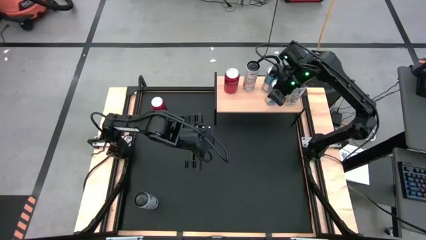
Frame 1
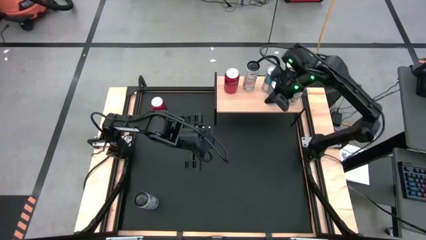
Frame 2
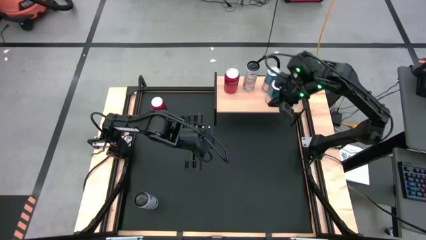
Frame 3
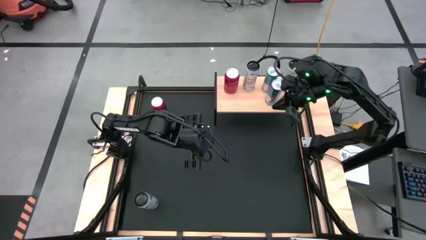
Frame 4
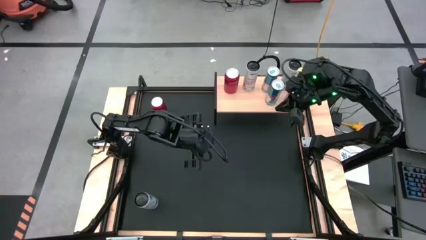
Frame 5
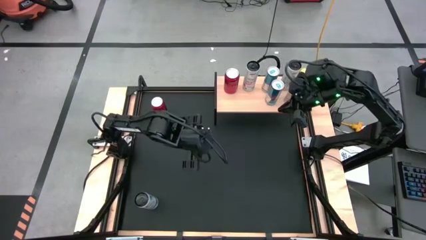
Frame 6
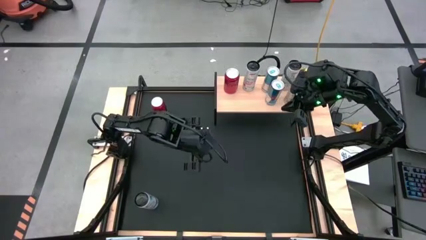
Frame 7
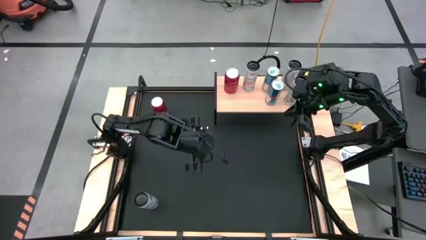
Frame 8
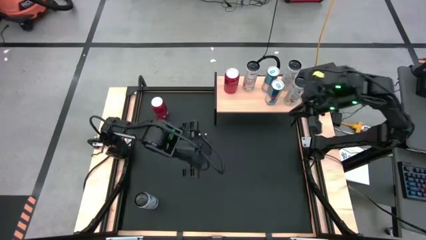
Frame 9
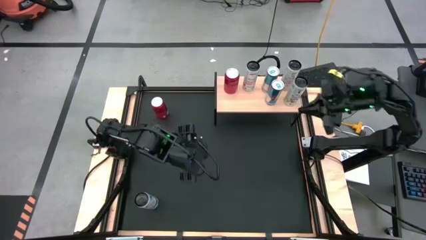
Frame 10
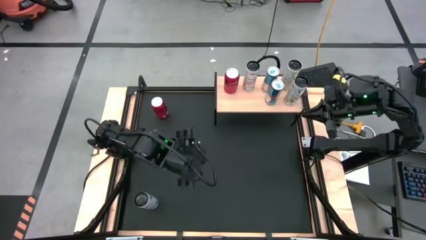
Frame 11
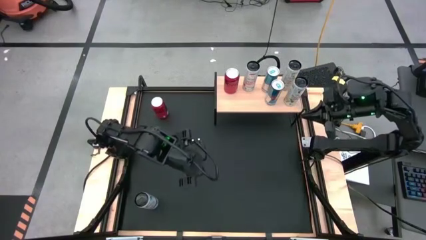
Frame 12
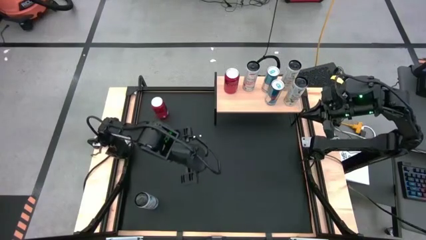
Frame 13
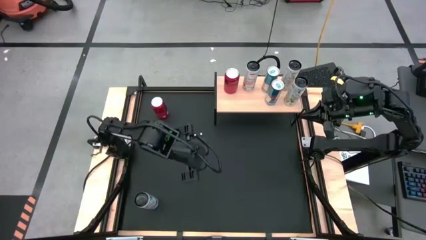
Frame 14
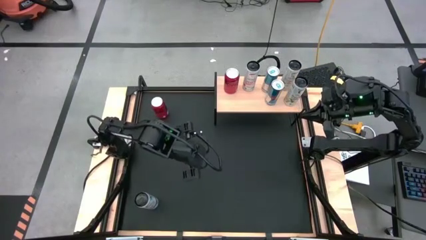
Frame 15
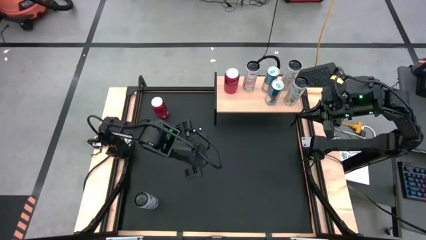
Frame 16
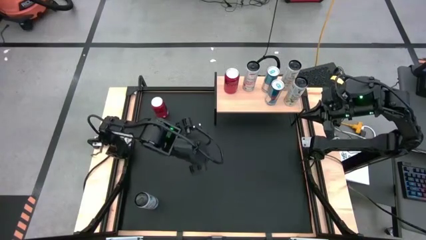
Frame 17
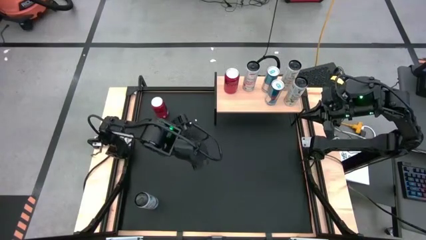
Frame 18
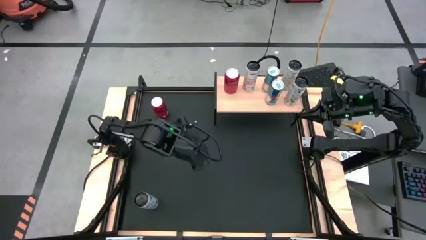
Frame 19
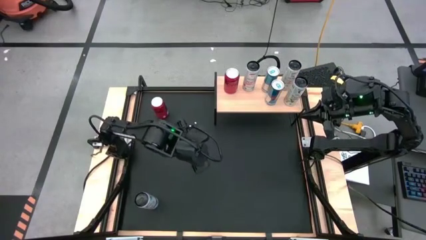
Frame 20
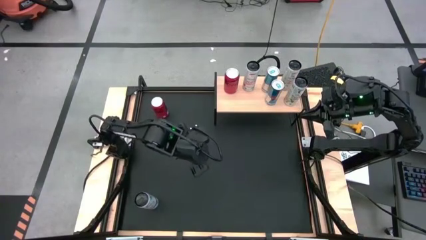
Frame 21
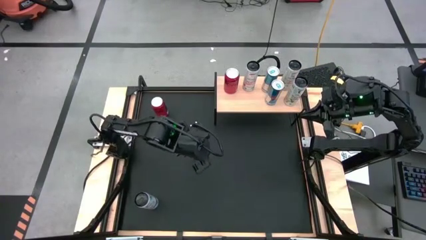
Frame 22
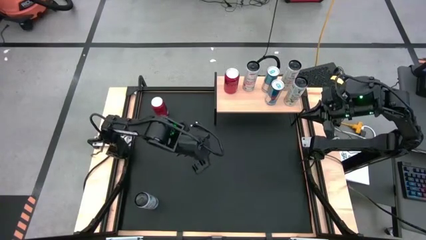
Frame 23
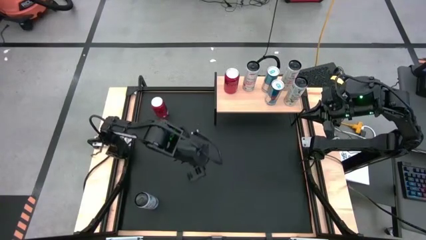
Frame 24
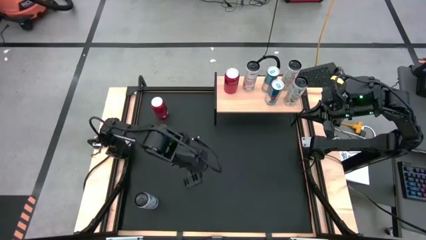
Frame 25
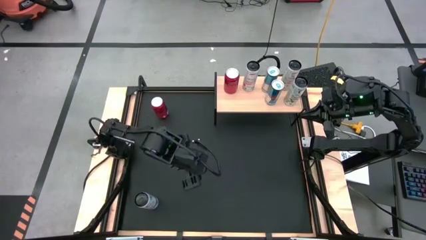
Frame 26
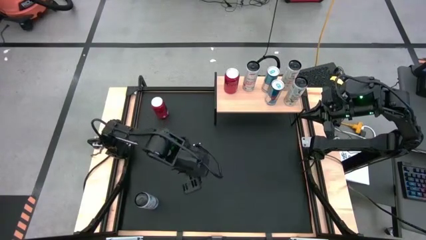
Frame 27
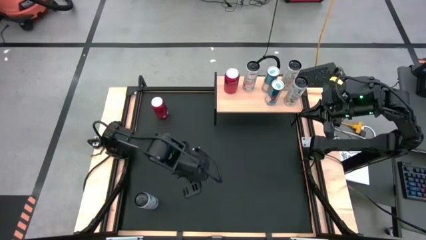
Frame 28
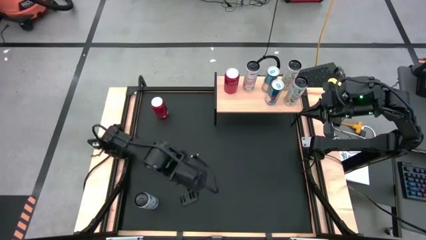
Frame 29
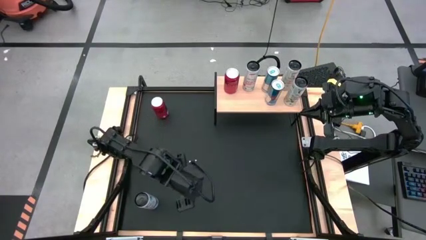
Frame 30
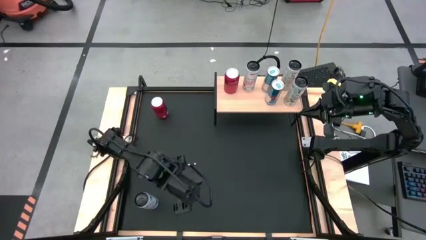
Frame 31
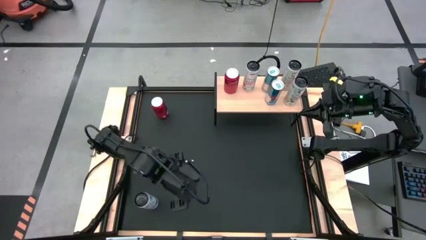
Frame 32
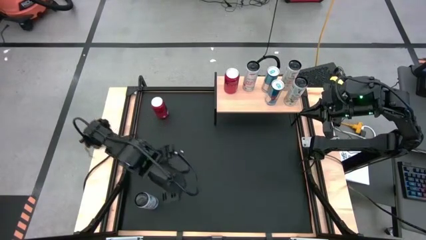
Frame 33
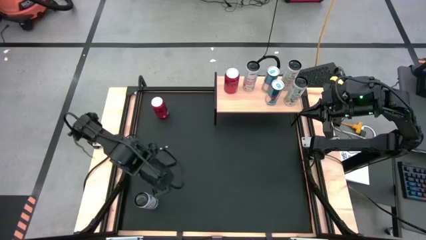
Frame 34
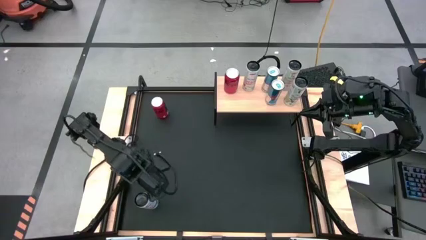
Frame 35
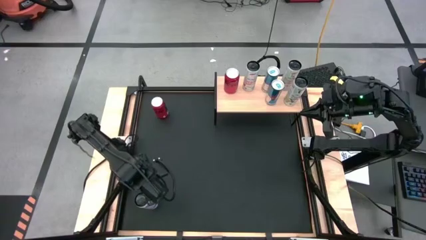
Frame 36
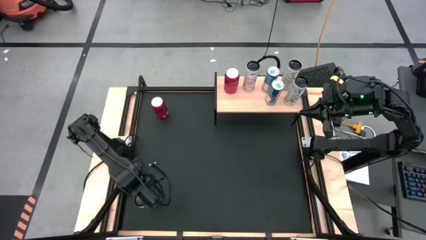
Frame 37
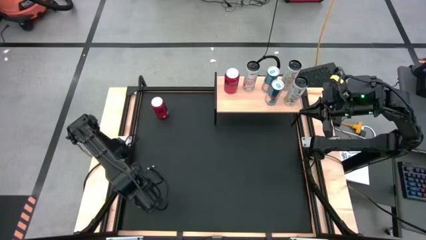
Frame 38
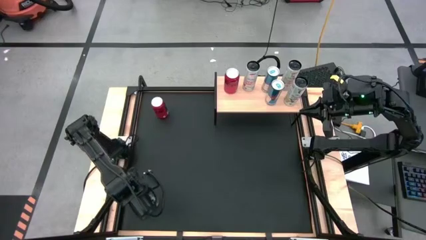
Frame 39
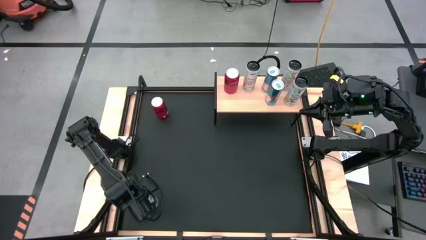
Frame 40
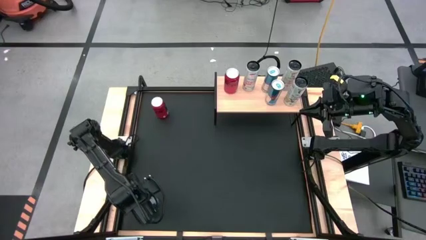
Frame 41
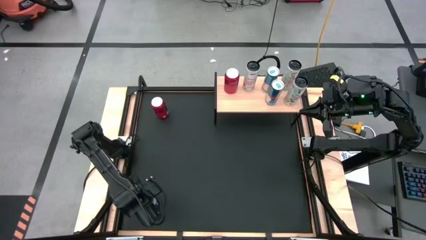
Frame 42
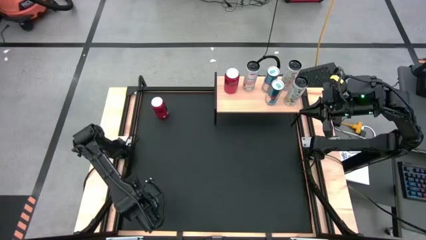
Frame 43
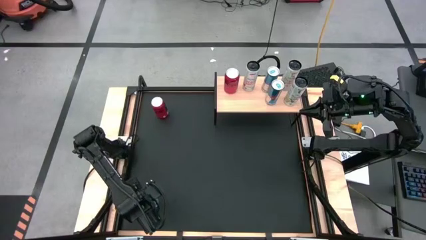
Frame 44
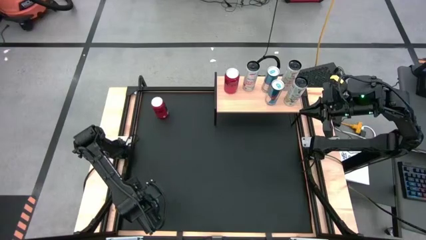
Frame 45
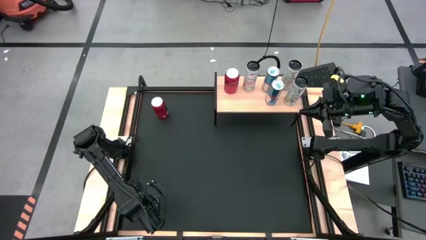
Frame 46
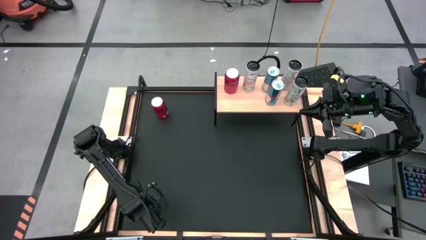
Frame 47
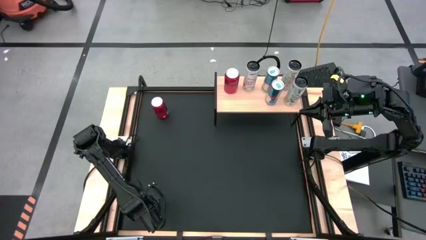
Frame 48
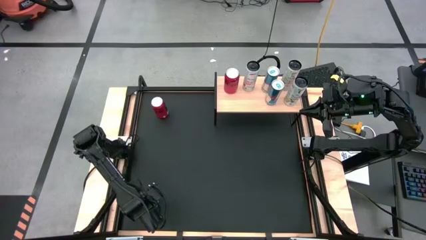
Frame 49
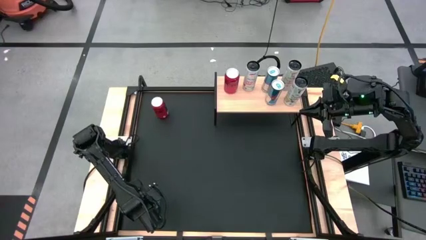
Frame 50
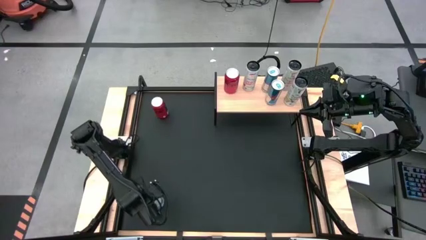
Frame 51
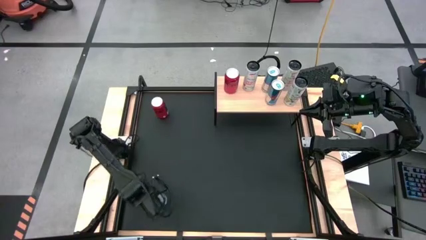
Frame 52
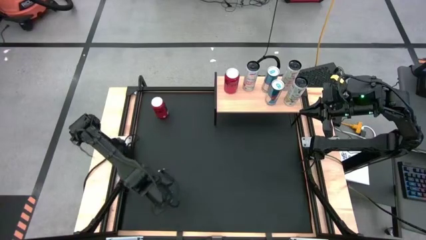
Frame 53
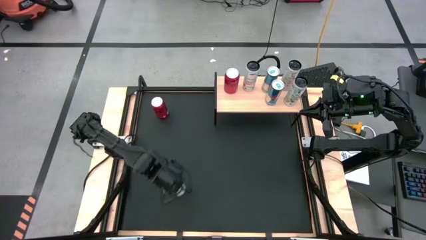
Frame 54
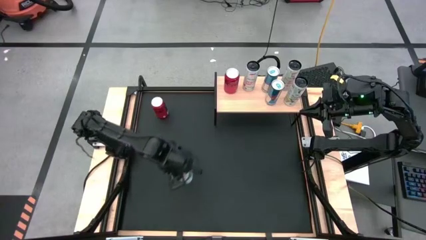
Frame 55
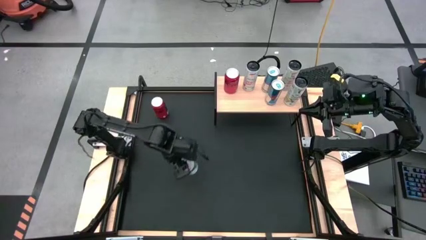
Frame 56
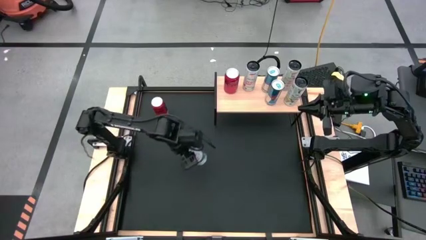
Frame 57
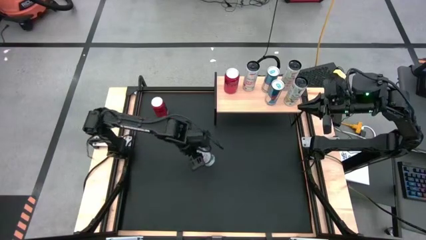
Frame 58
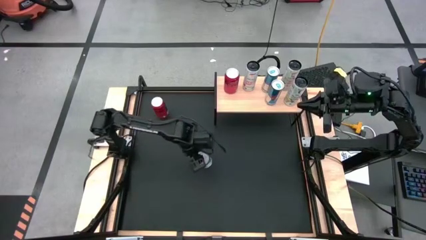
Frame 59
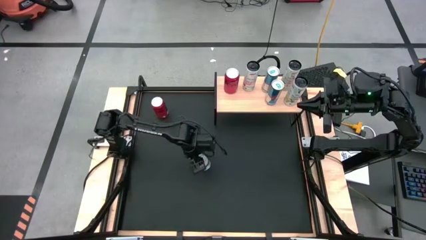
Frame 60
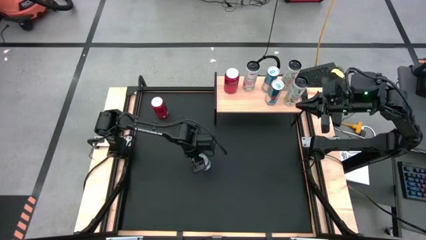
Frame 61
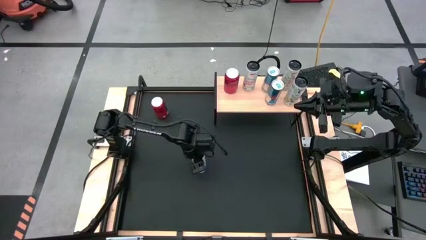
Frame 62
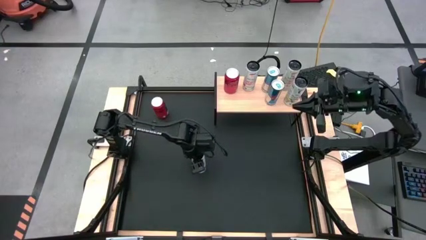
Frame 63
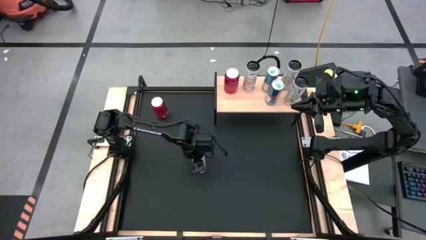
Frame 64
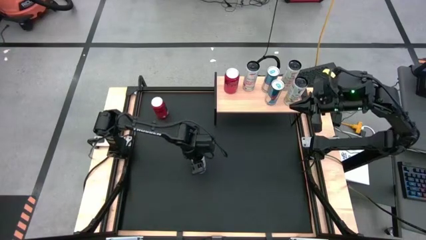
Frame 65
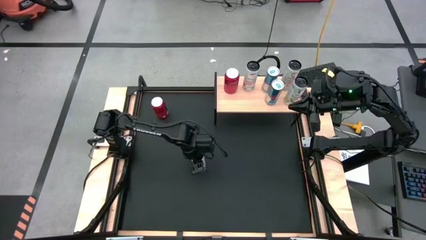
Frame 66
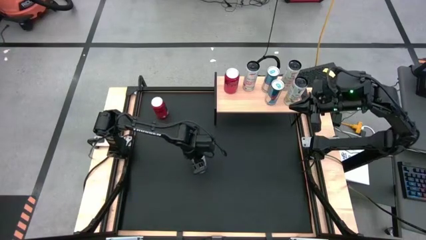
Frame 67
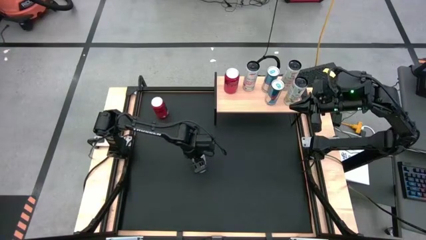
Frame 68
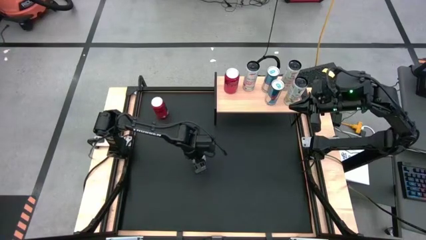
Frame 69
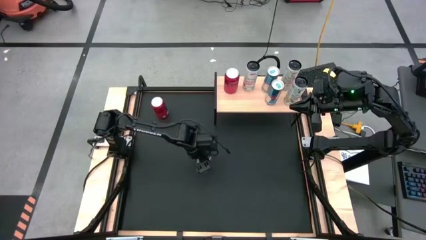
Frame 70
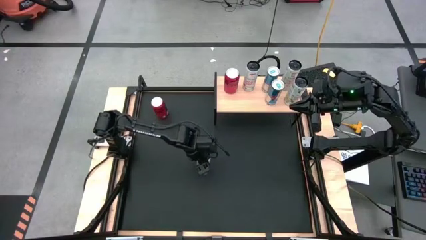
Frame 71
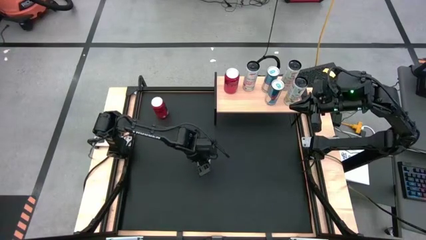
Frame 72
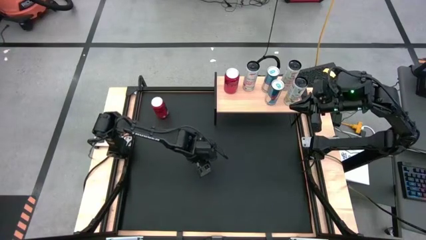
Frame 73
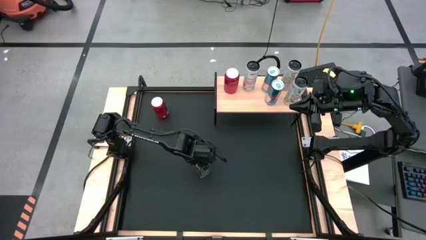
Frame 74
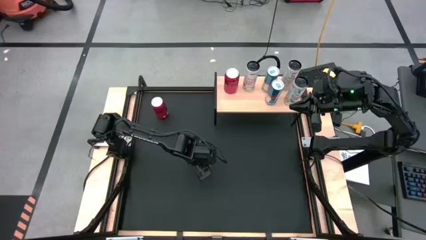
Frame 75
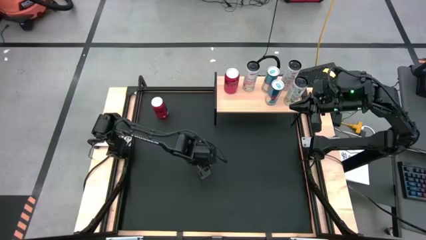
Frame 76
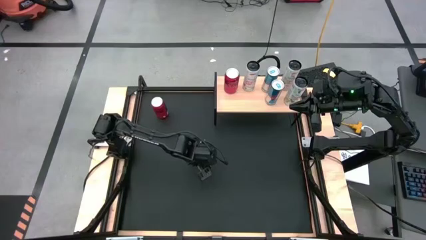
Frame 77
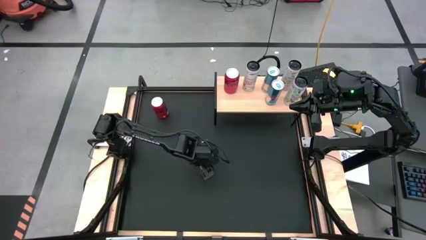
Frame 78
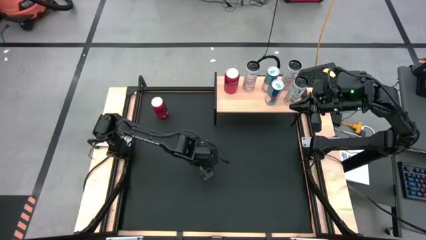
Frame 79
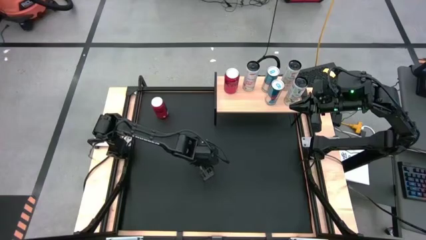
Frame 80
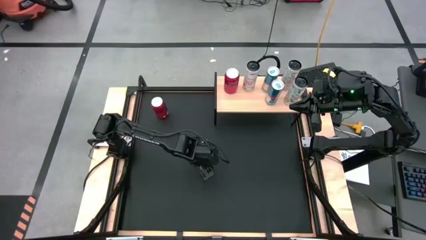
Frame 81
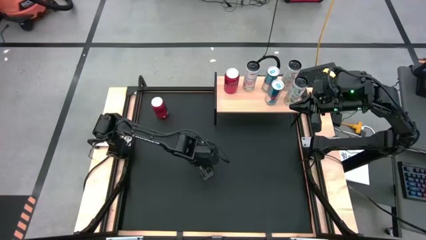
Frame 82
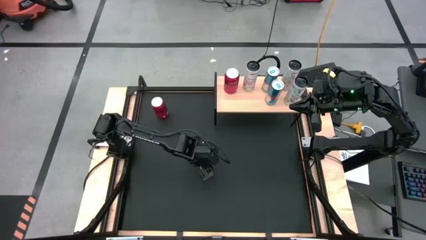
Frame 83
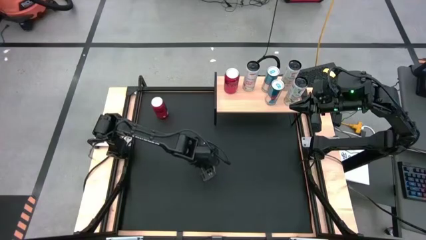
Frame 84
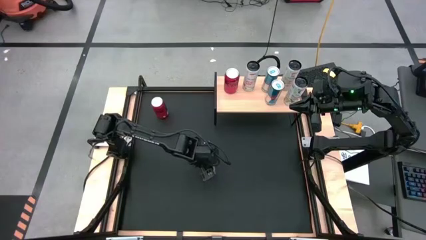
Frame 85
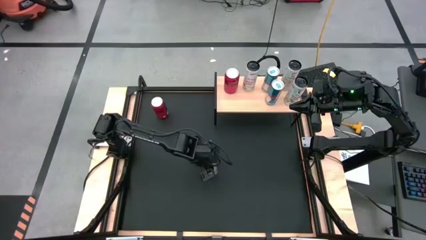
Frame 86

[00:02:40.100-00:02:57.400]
Task: Place canned beverage on shelf
Put the white-pink soda can on the shelf aligned with the other white-pink soda can
